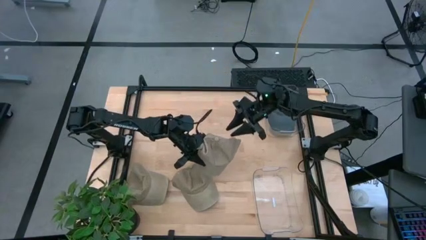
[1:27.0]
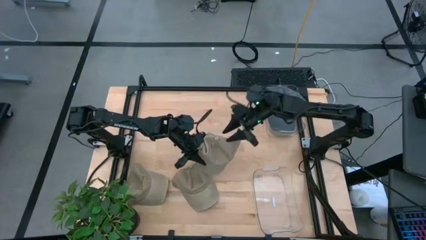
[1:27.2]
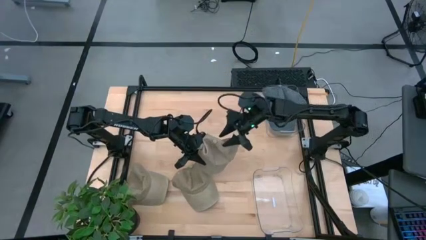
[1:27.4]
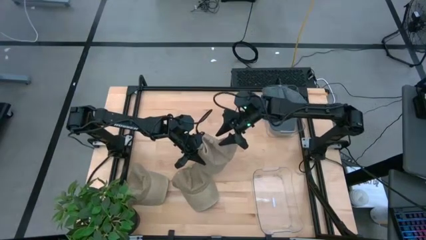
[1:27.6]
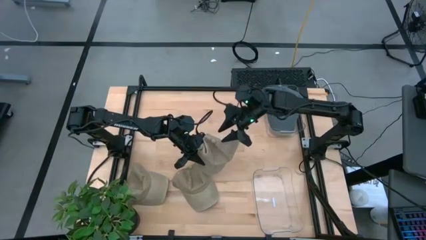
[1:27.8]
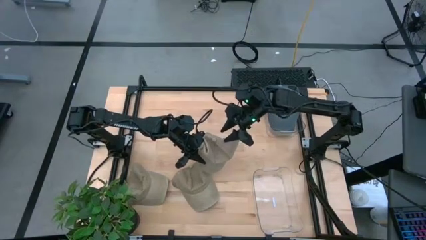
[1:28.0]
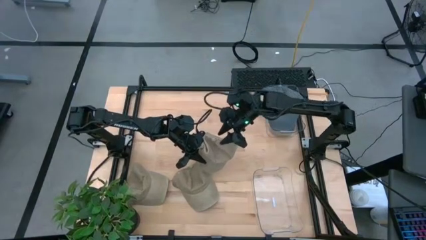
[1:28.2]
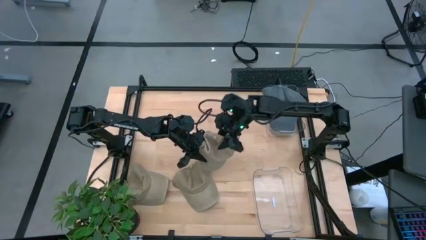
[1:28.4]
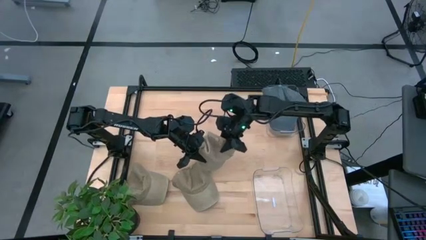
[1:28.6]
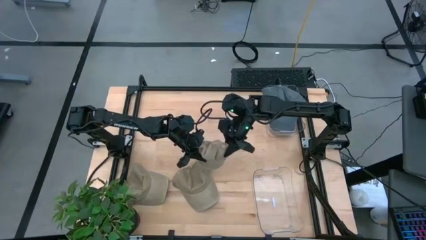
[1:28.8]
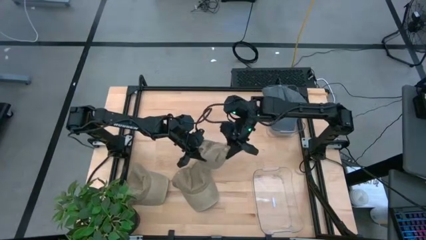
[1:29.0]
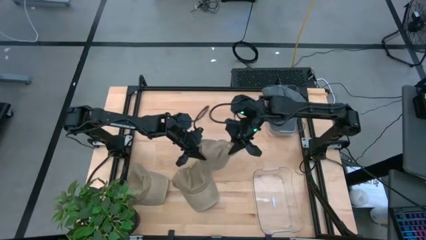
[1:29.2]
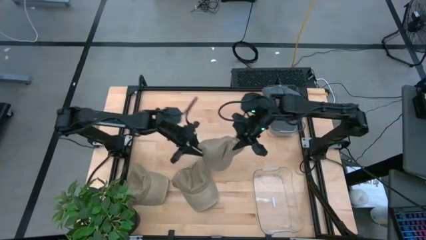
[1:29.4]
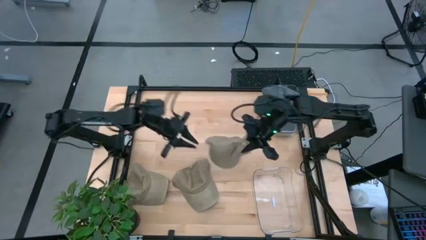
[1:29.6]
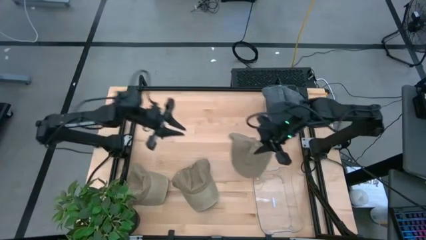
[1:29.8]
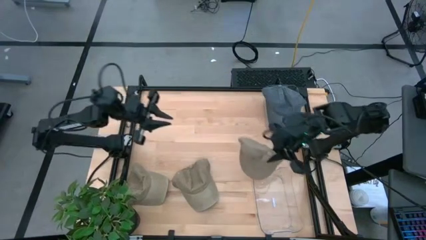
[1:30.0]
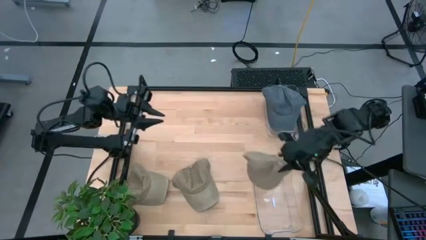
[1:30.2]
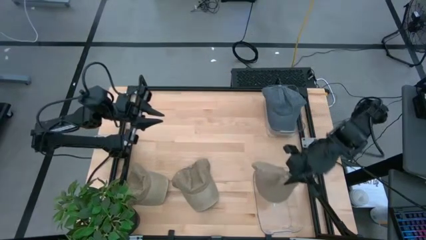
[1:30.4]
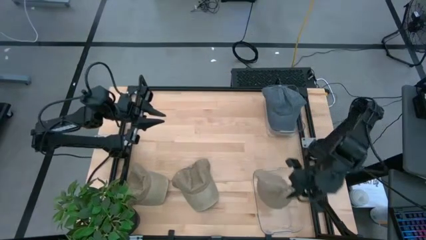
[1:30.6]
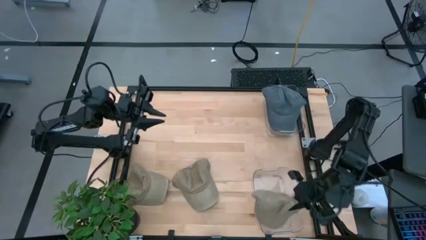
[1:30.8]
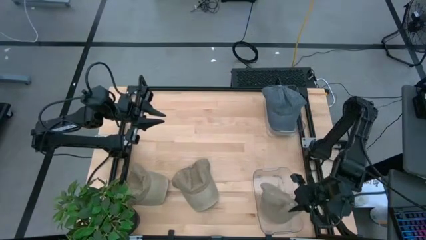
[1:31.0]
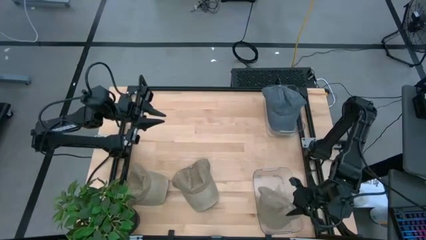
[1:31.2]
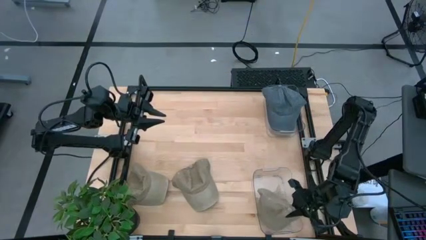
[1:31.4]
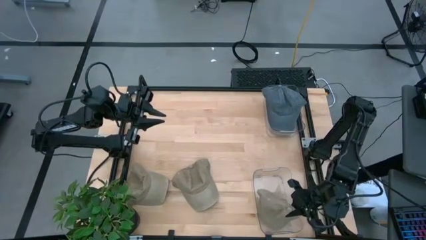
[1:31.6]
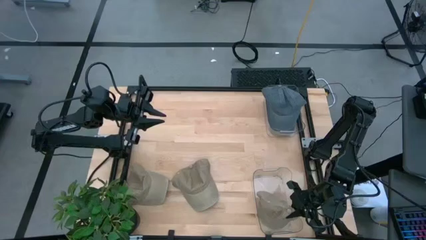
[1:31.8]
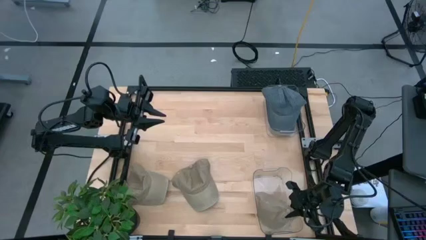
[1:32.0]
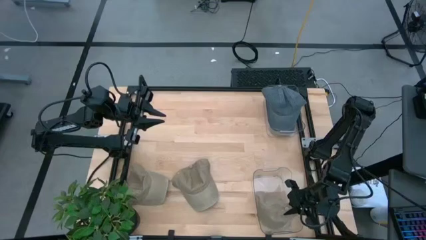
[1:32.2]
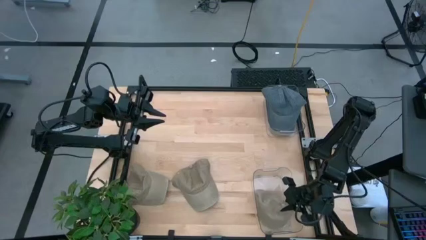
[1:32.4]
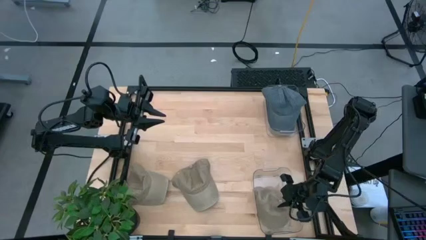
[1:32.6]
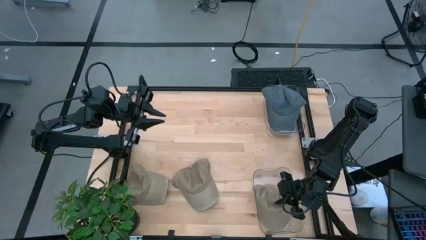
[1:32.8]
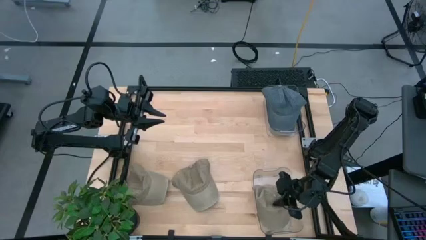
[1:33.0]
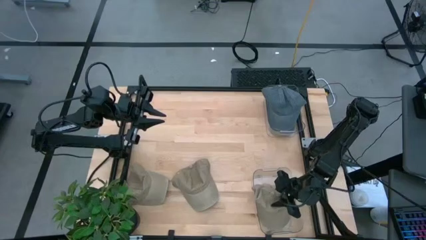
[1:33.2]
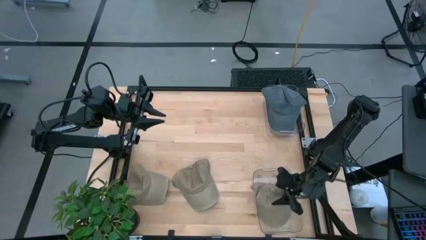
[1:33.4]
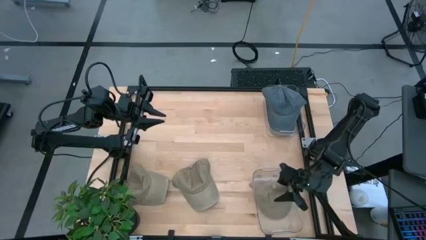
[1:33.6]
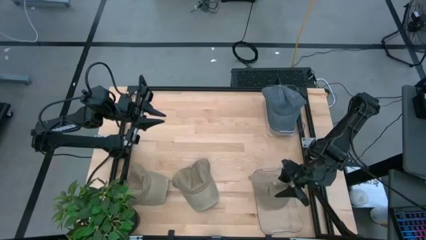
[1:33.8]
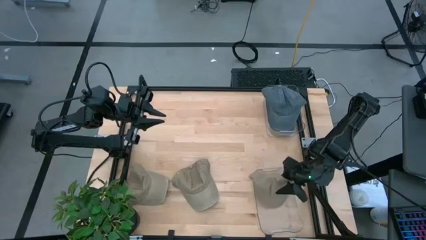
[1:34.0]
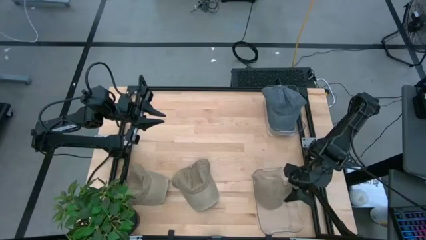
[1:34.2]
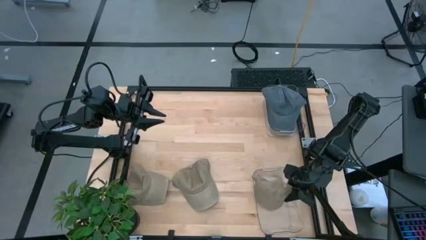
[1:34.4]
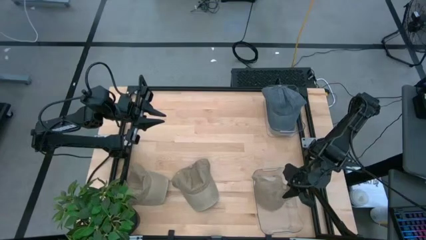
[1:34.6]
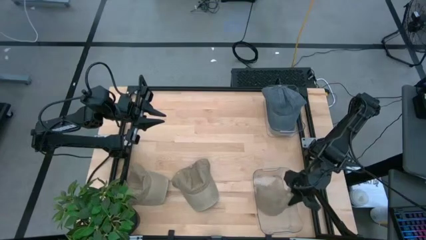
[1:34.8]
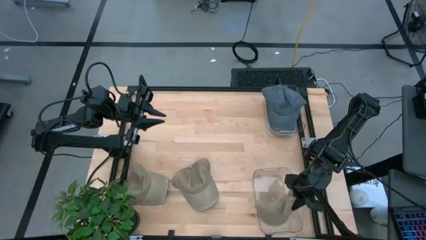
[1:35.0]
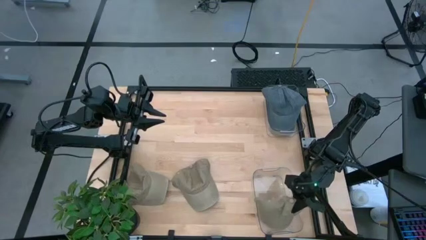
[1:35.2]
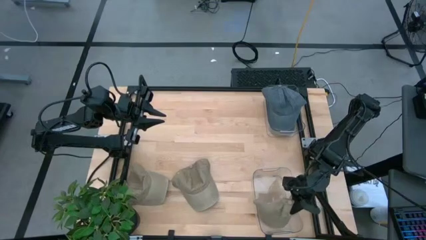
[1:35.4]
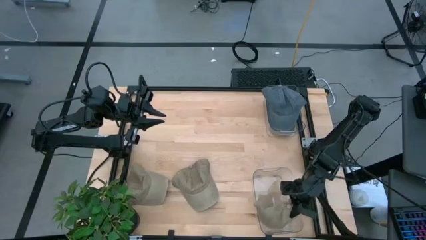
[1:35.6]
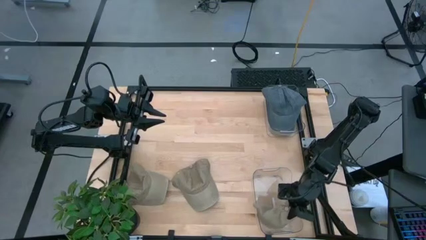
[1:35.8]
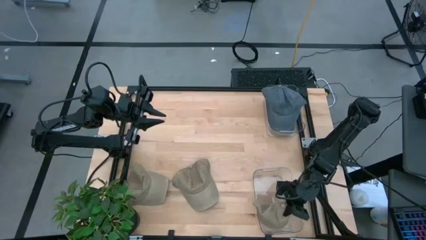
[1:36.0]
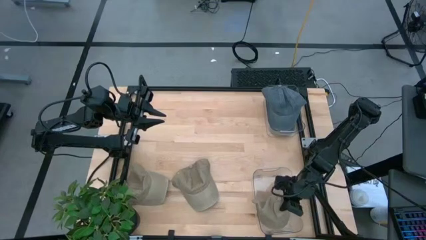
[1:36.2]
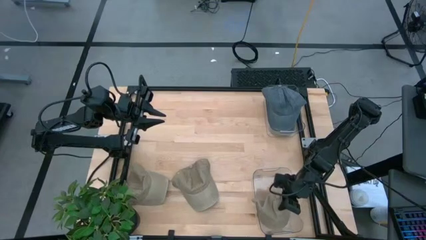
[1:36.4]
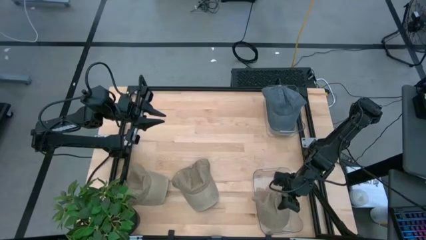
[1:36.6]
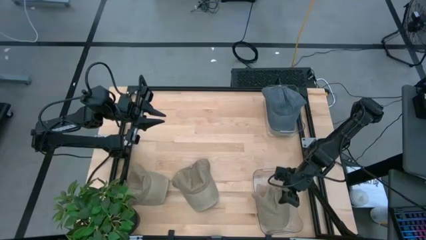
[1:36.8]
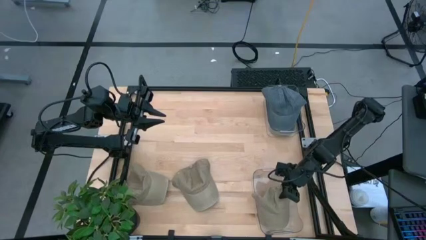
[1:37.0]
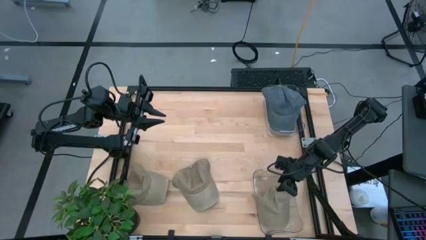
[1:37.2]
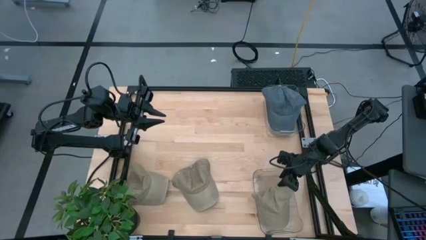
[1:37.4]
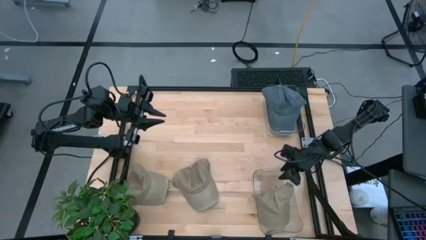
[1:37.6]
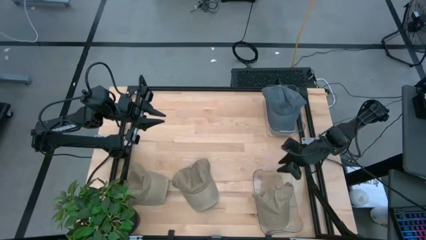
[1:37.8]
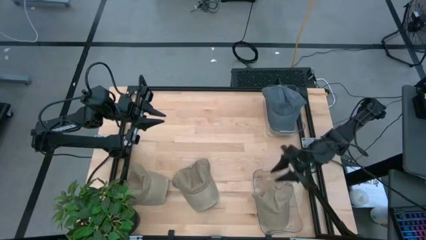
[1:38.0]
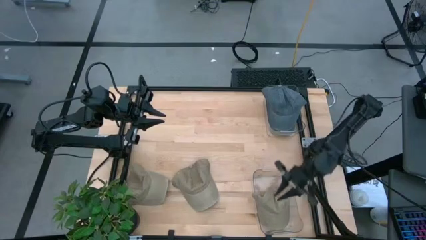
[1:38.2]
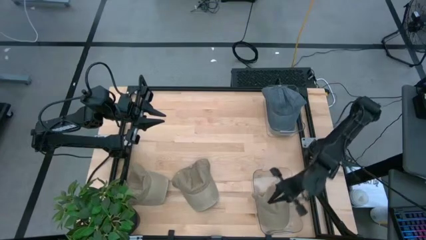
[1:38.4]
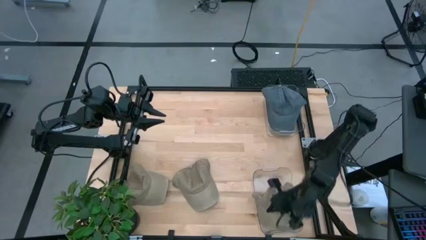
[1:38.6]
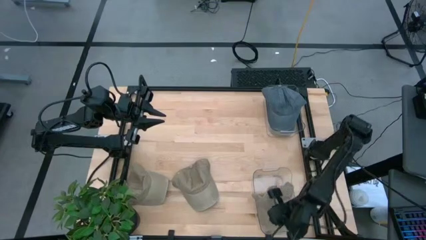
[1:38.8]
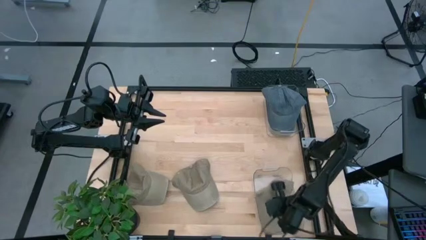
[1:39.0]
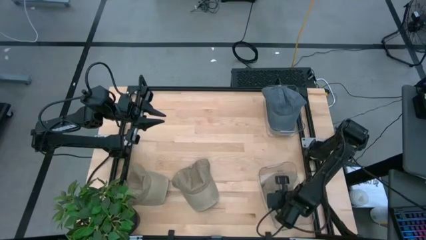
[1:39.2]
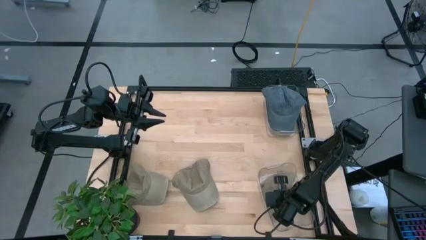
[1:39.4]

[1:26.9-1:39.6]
Task: Pick & Place hat
Put the top brown and blue cap into the bottom transparent bin

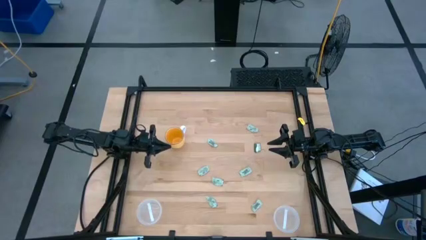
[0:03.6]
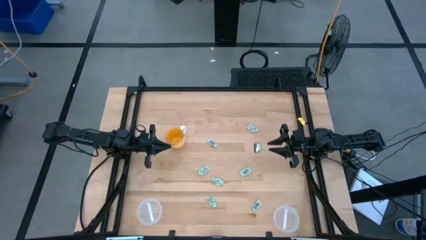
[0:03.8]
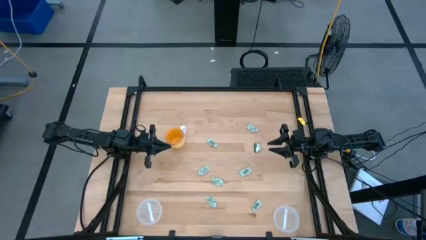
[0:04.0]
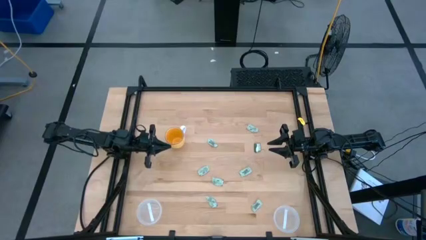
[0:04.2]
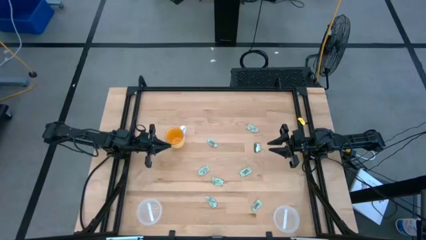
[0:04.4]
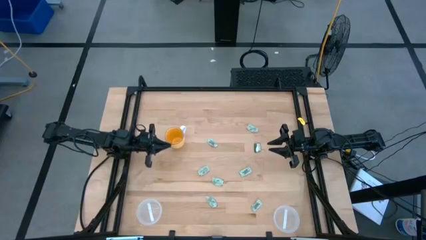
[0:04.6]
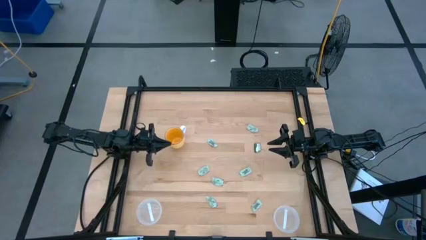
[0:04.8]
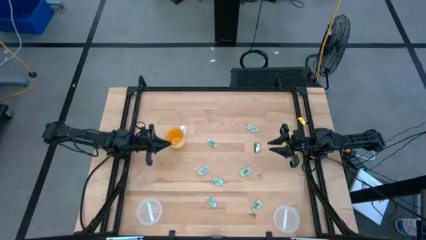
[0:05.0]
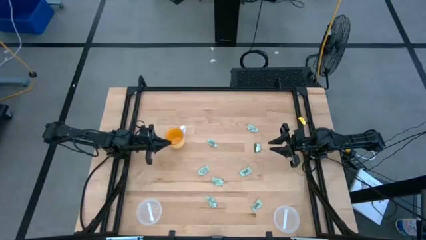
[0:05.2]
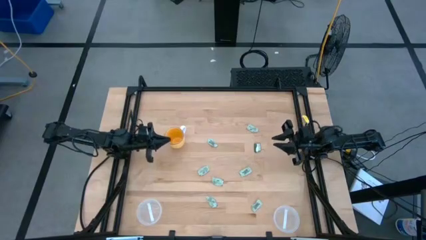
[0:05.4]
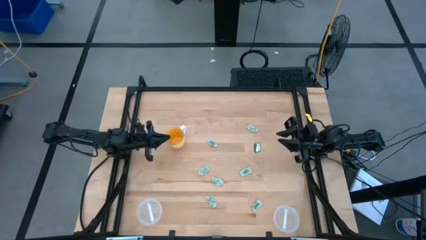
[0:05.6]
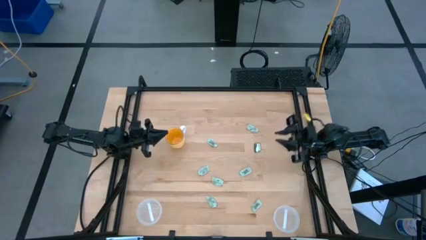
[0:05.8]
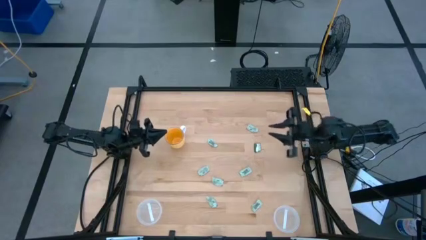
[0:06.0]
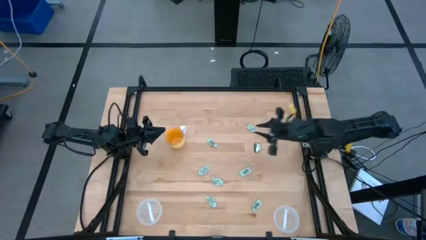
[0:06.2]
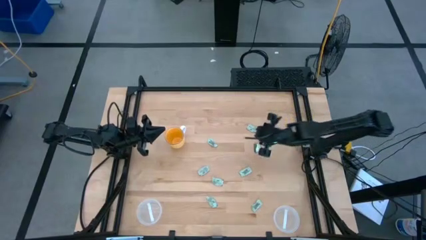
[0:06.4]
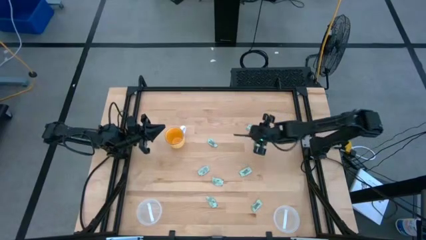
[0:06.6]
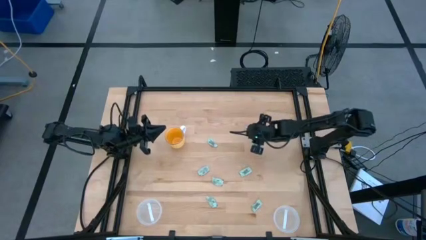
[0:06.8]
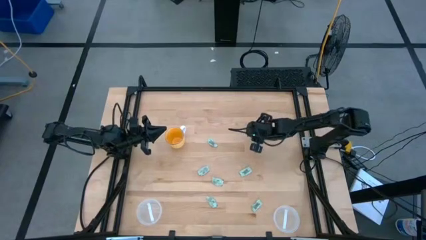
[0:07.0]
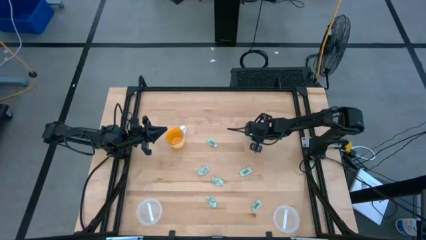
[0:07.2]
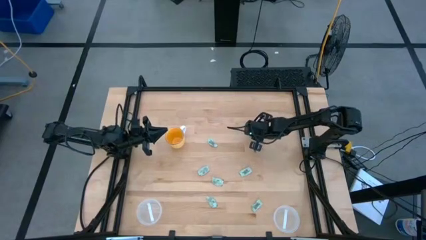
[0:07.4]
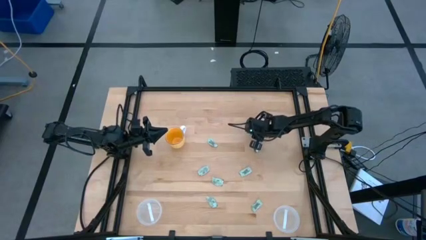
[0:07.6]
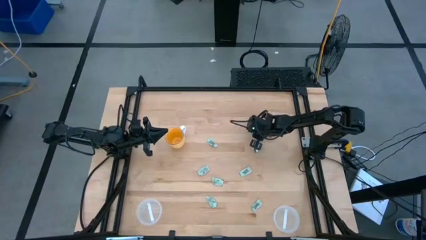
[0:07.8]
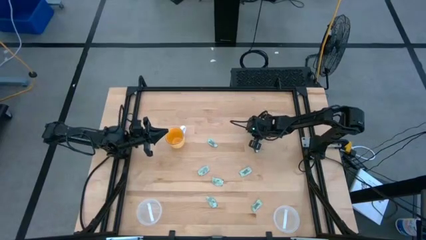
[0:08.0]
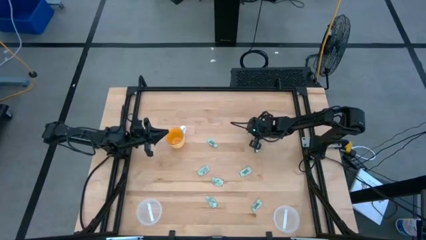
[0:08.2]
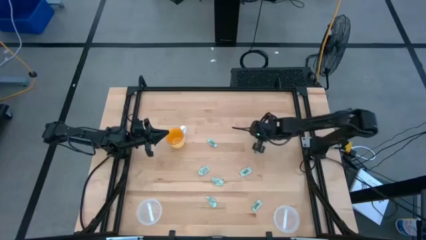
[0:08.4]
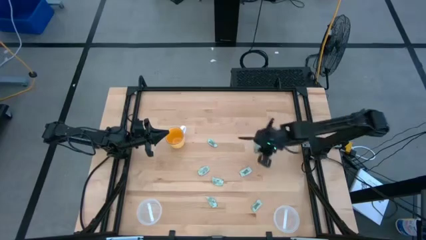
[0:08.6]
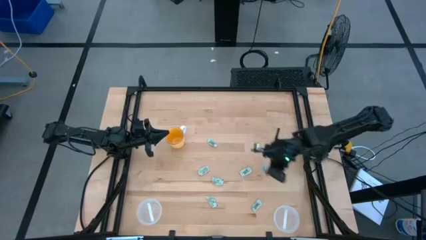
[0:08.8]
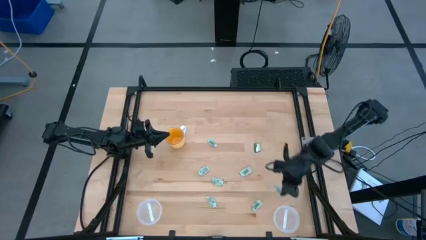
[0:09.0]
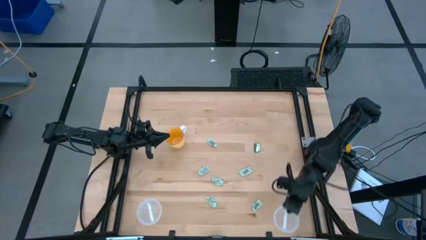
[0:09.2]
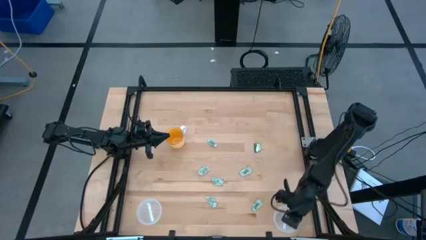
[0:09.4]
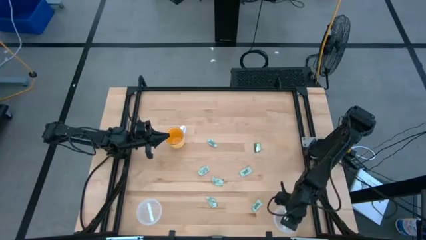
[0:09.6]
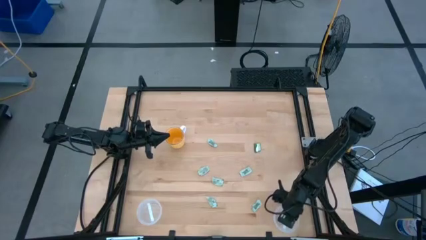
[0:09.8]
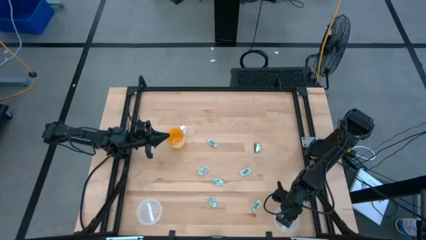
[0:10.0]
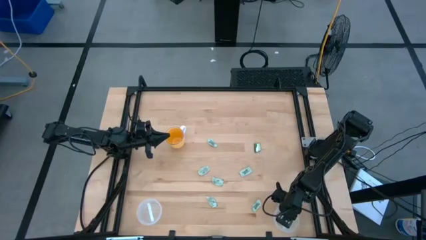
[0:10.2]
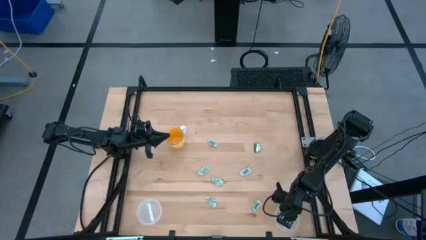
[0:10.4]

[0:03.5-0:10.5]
Task: Pick and place items into bin
Put the stevia packet into the right transparent bin
